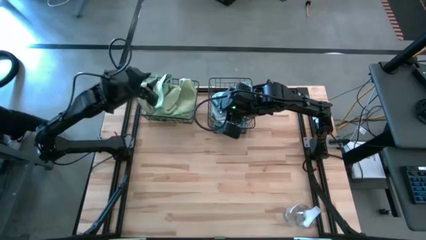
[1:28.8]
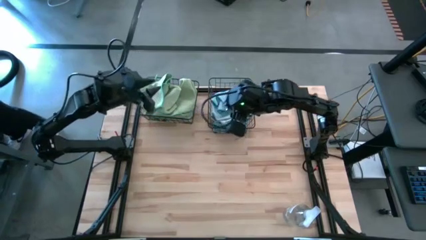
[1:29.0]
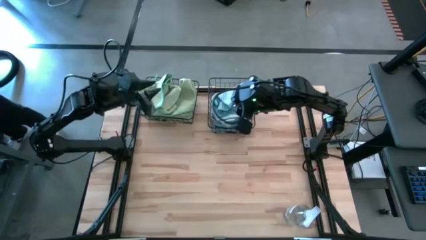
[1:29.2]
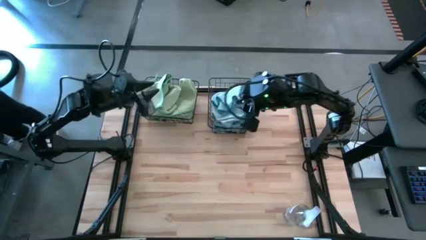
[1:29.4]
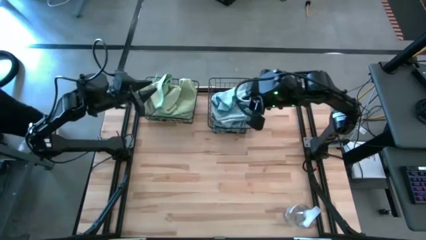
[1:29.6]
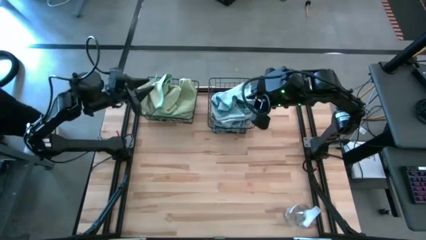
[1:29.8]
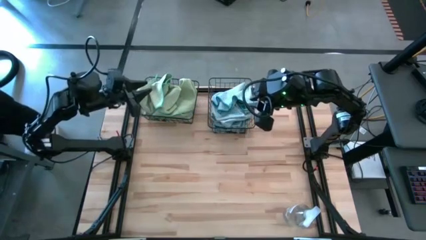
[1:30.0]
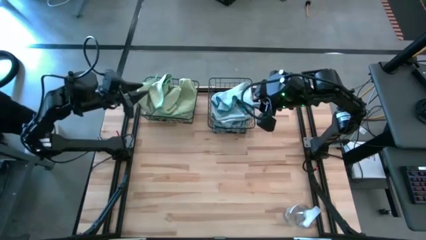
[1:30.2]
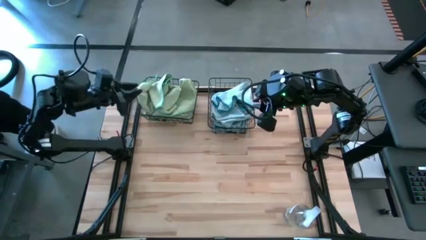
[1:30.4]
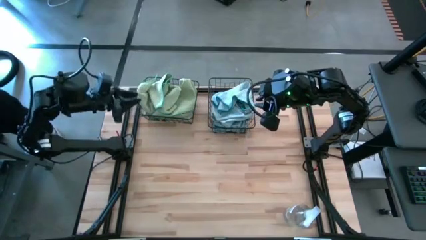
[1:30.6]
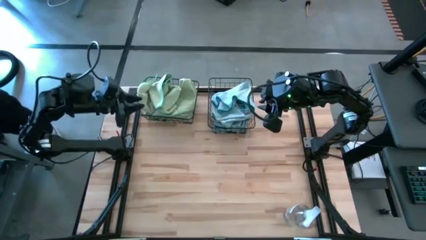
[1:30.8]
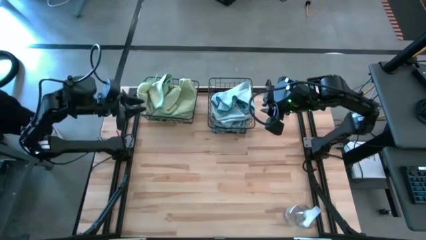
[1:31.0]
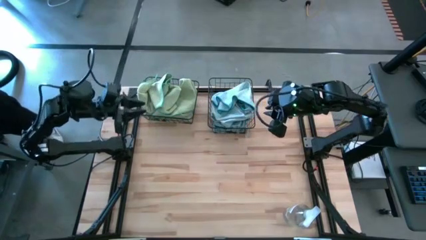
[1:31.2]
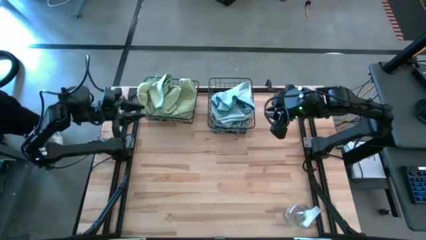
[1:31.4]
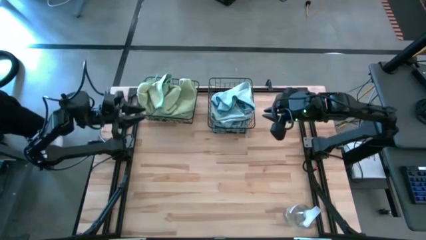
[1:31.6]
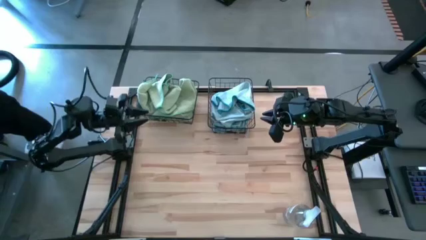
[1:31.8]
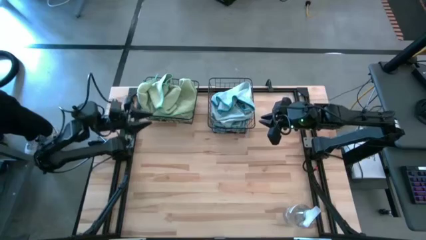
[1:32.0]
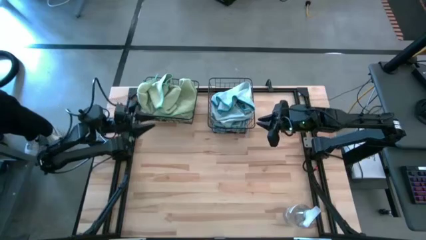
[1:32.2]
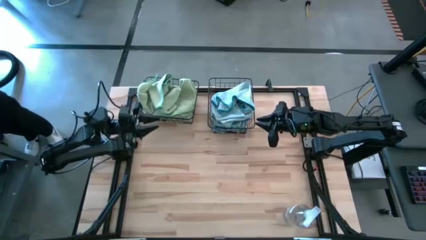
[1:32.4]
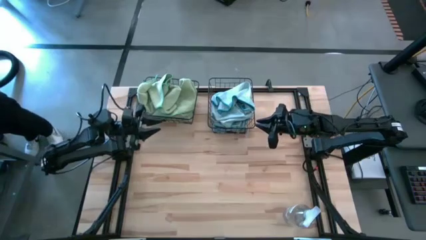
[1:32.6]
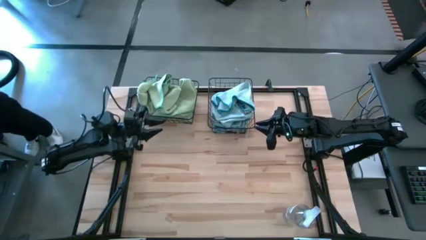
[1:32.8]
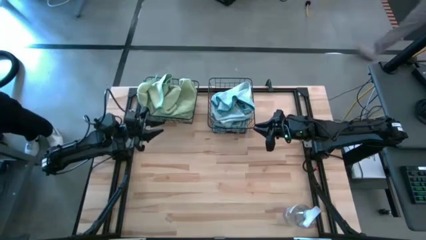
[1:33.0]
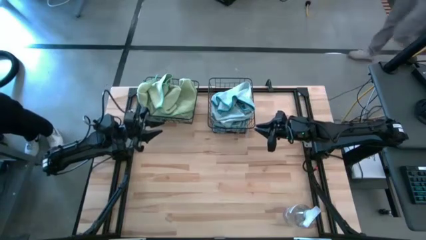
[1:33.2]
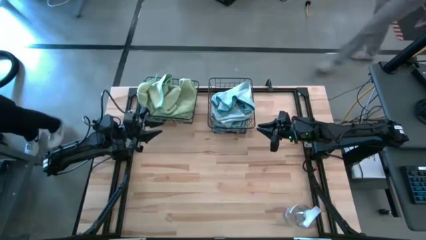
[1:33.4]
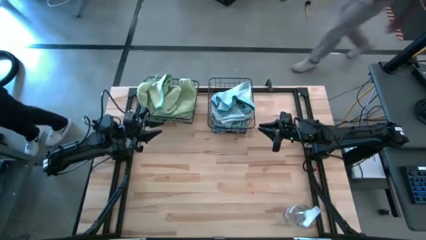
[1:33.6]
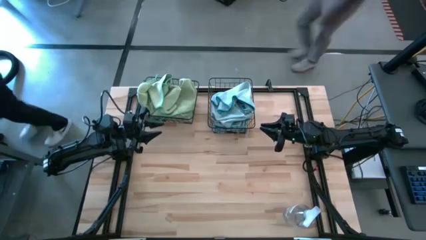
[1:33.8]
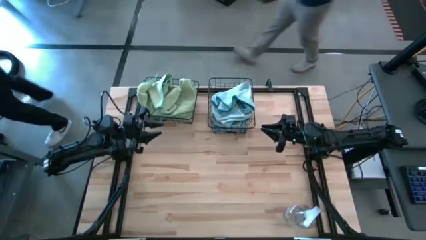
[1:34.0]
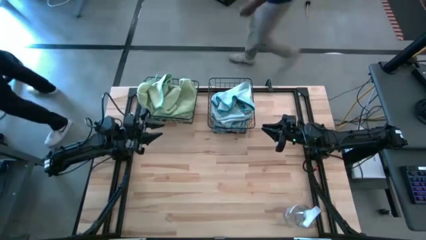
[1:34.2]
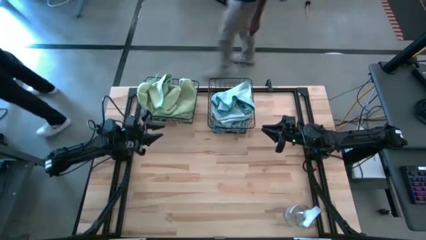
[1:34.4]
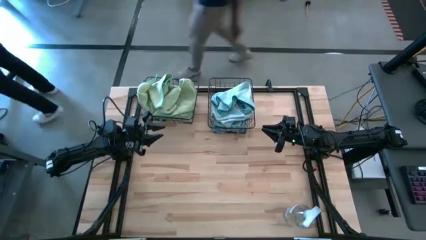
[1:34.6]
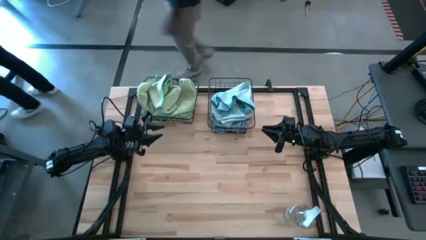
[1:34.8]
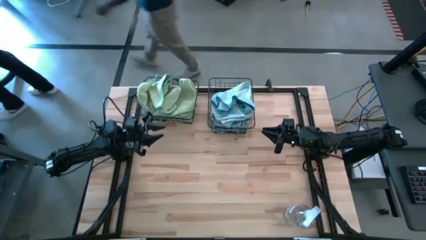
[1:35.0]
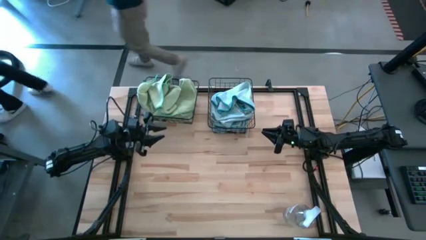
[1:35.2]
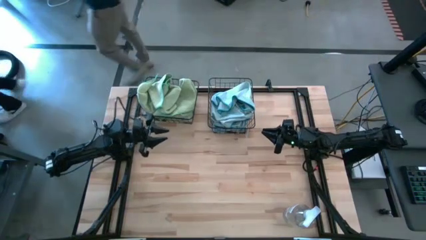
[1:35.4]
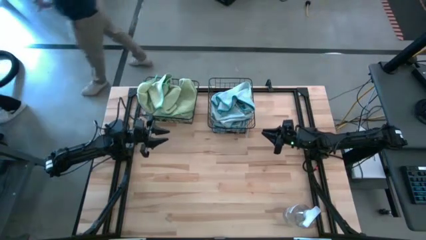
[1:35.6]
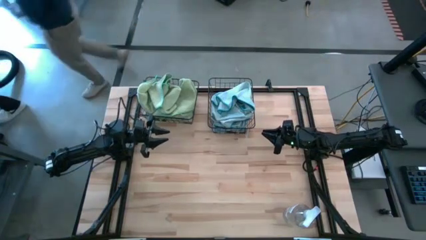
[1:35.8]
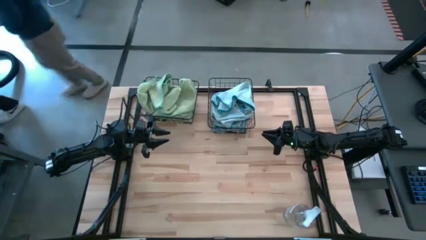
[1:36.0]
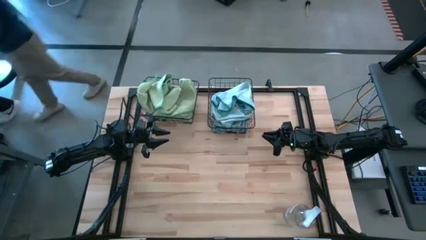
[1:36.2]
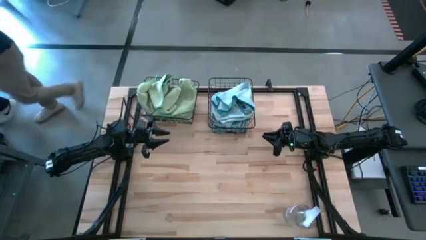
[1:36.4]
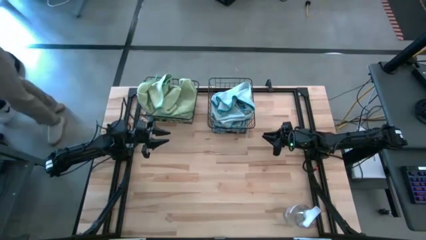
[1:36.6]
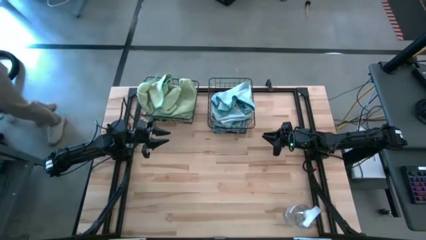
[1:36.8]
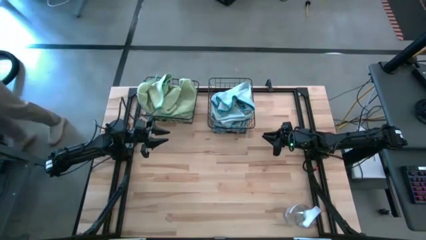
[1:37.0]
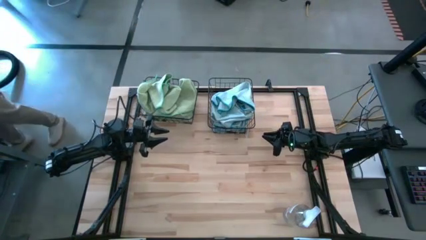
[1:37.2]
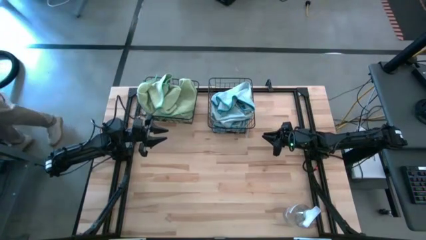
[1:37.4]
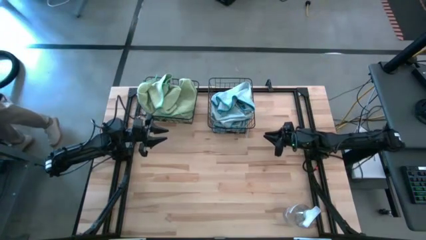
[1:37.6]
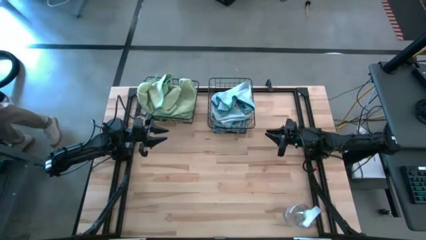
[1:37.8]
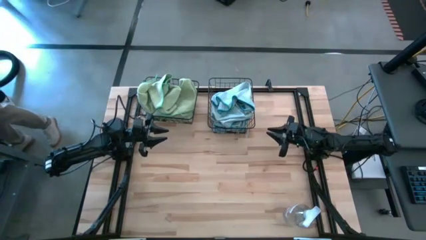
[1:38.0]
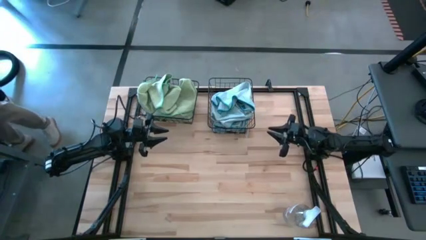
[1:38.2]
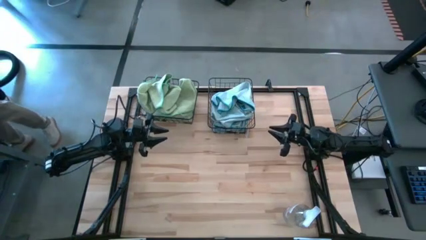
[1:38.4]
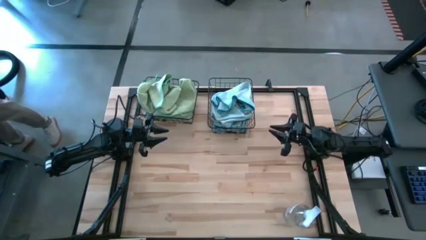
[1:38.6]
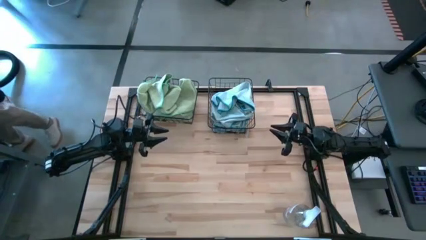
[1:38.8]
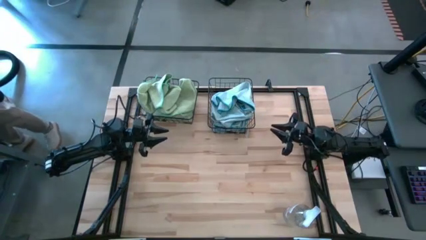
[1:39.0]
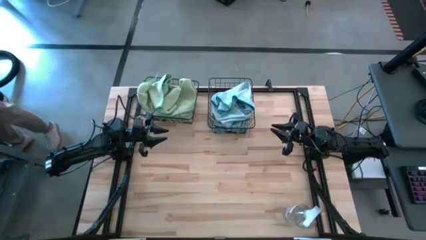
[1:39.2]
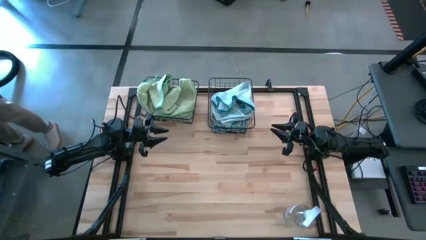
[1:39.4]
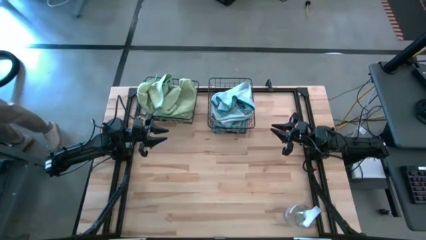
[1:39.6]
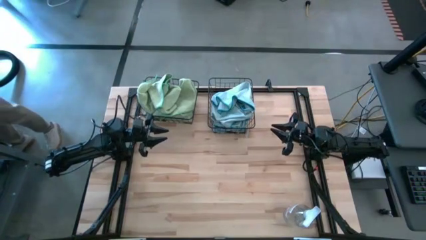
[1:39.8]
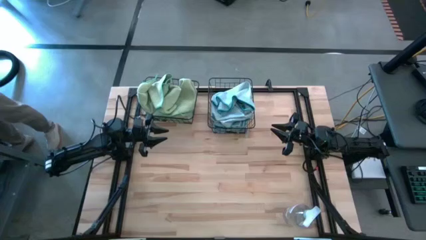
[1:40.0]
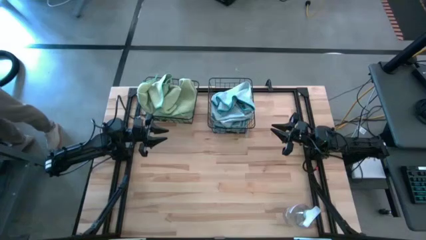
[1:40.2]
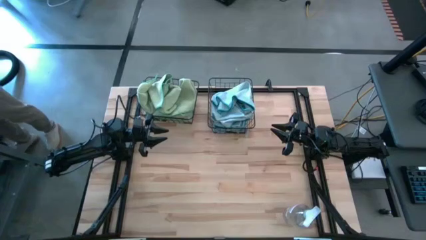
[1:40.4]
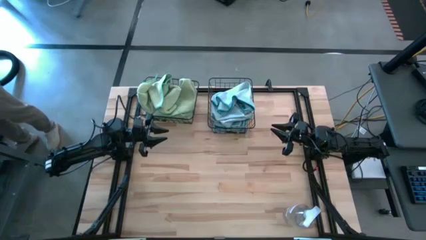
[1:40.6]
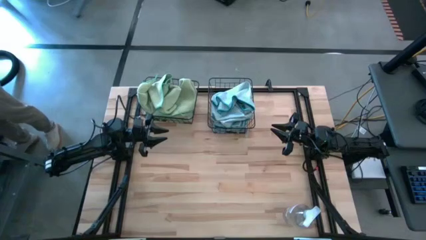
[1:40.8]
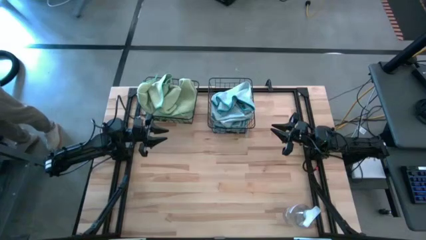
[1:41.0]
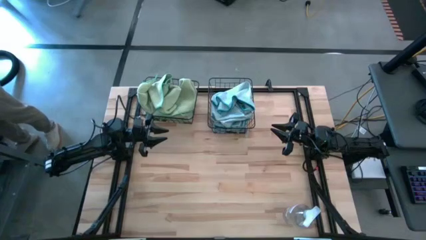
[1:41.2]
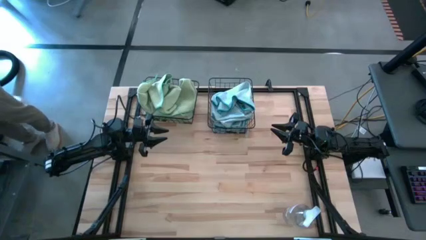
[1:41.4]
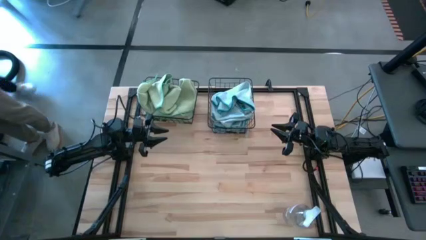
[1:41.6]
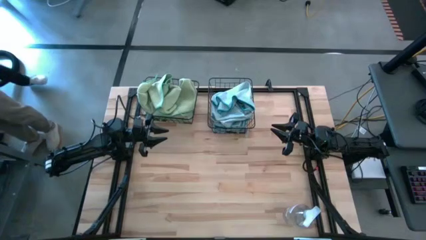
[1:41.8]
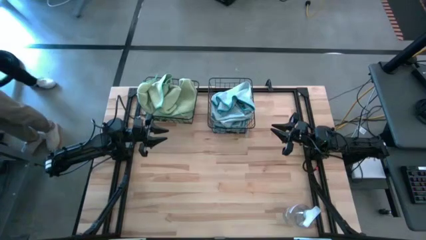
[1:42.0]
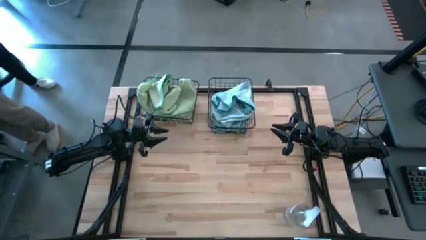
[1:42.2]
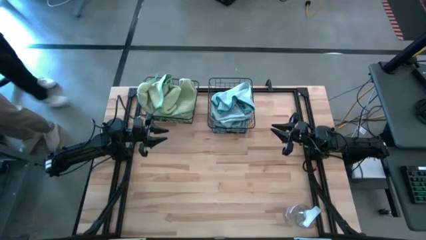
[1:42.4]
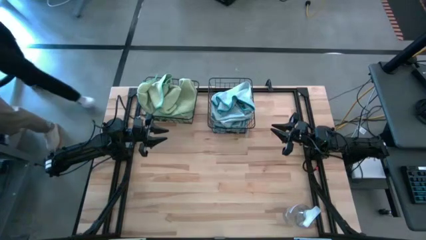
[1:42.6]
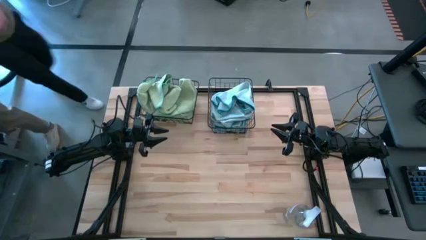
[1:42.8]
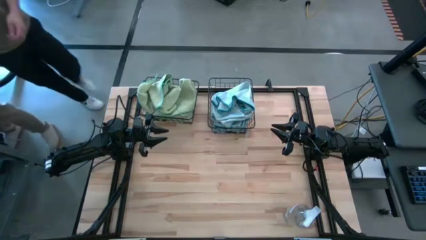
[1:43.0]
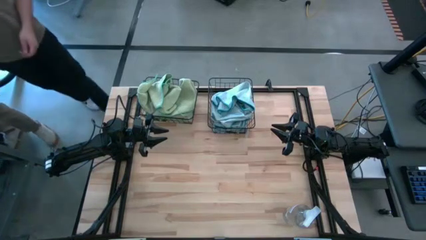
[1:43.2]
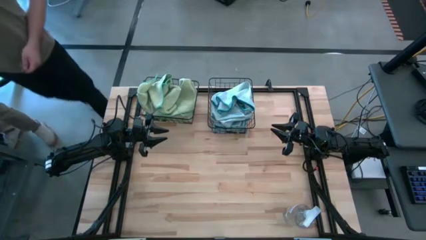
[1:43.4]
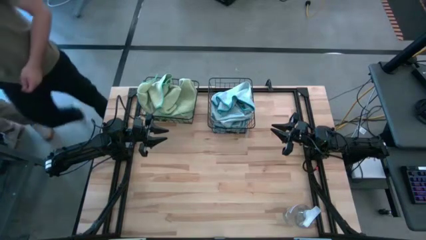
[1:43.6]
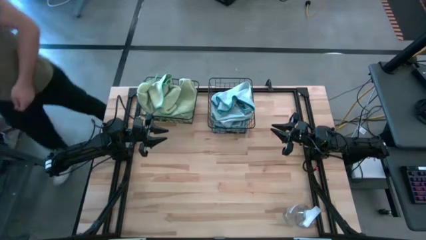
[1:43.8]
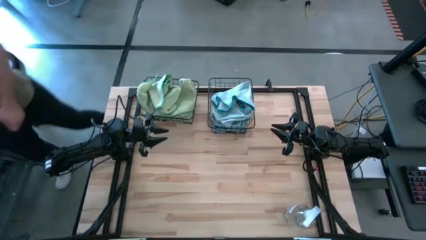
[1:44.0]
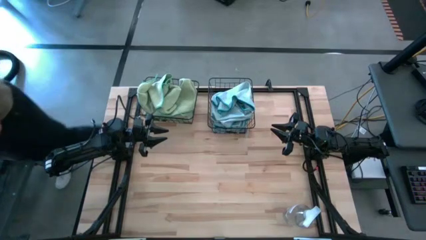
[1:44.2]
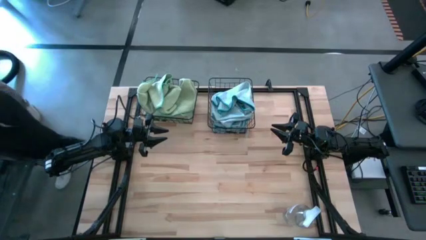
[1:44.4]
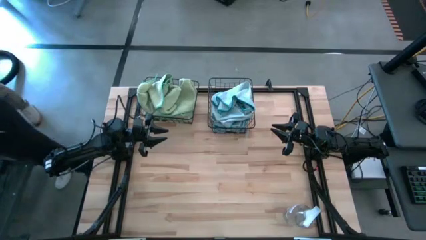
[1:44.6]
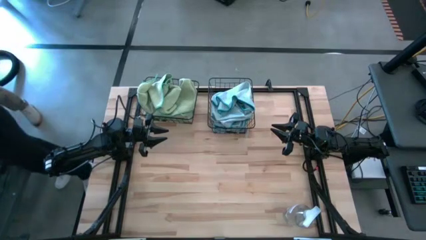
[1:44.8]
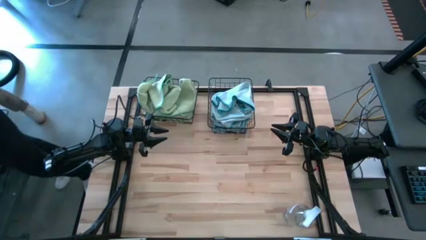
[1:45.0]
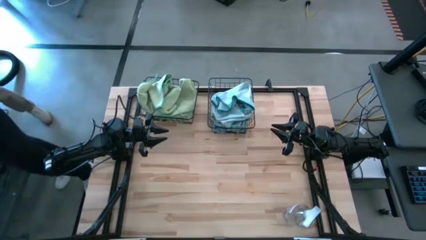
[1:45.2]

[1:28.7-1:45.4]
Task: Sort microfiber towel by color & place in baskets
Return to Home Position

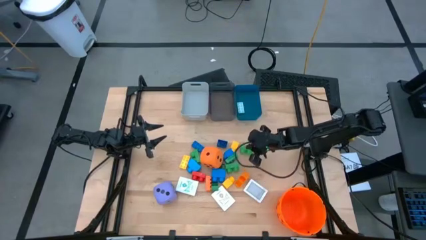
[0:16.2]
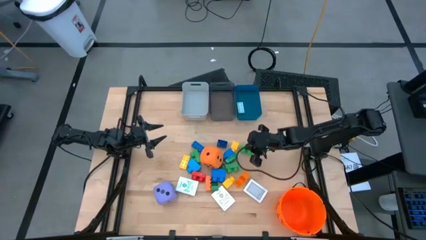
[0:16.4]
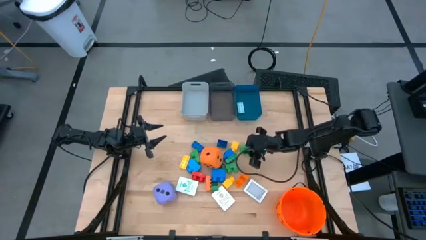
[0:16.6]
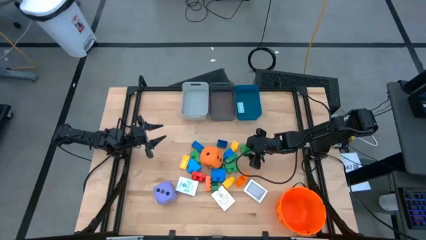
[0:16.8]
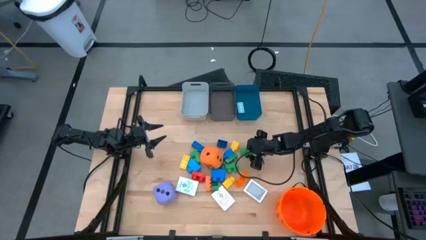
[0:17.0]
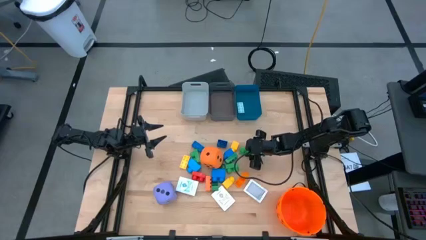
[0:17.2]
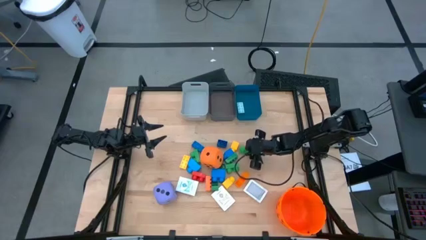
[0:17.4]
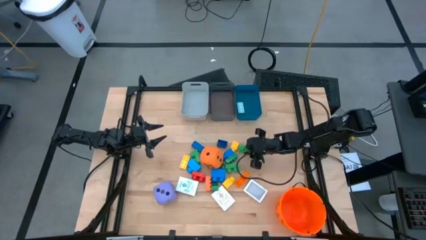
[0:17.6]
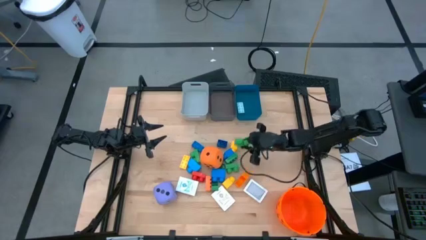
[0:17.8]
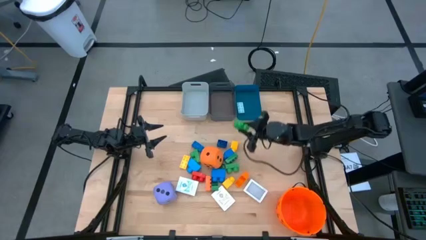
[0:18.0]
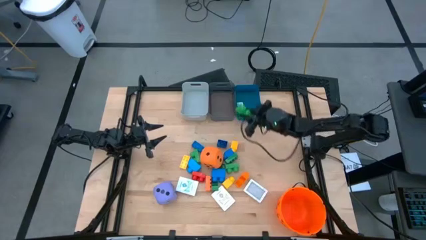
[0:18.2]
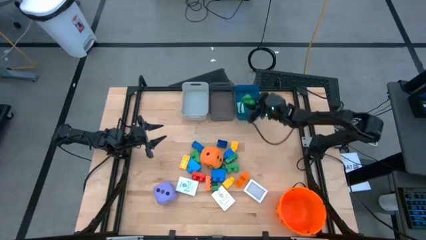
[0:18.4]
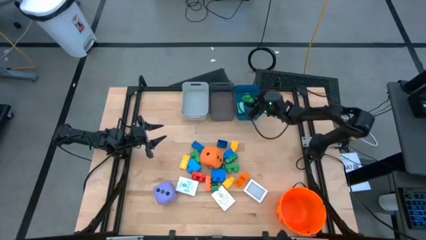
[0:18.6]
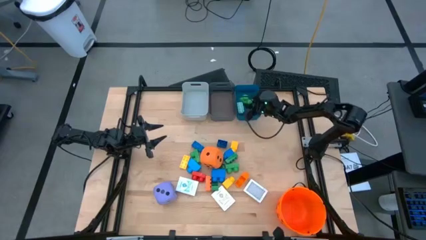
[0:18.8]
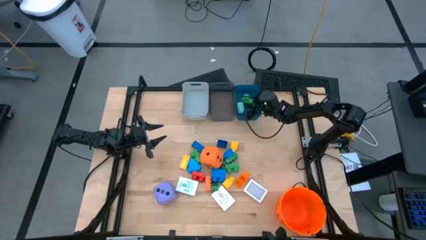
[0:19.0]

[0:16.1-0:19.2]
Task: Pick & Place Toys
Put the green game piece into the blue bin
